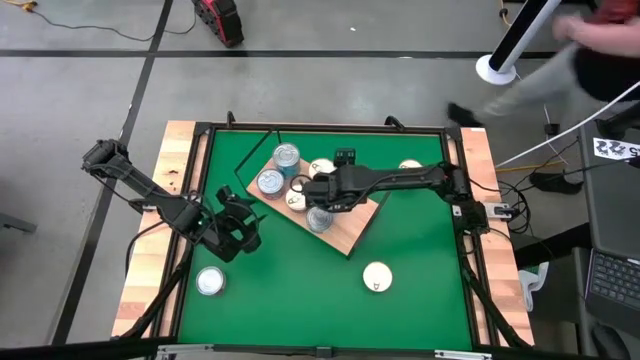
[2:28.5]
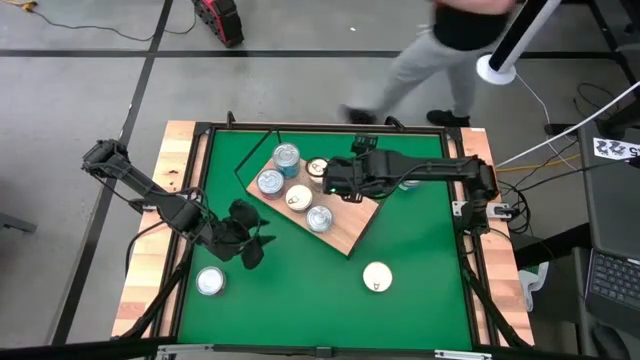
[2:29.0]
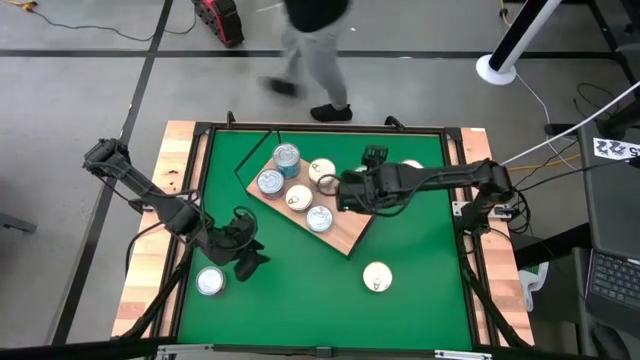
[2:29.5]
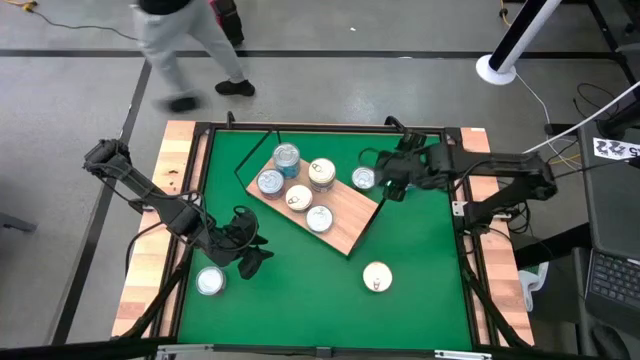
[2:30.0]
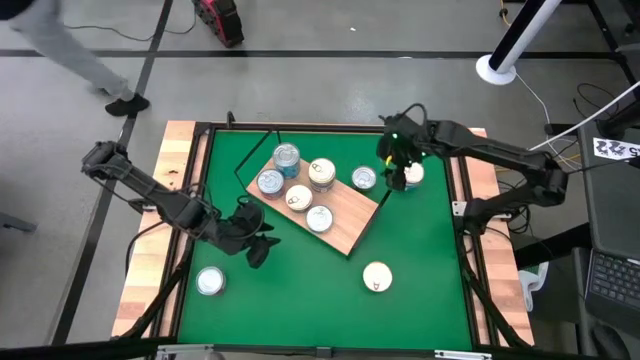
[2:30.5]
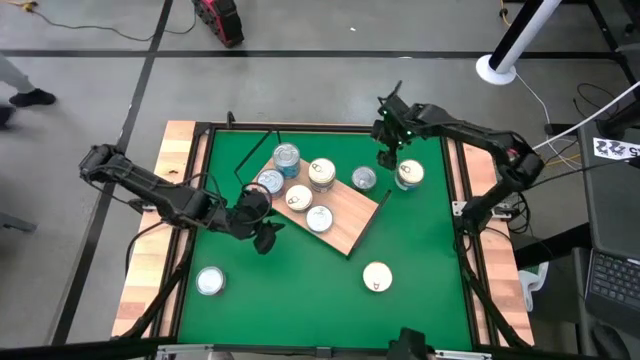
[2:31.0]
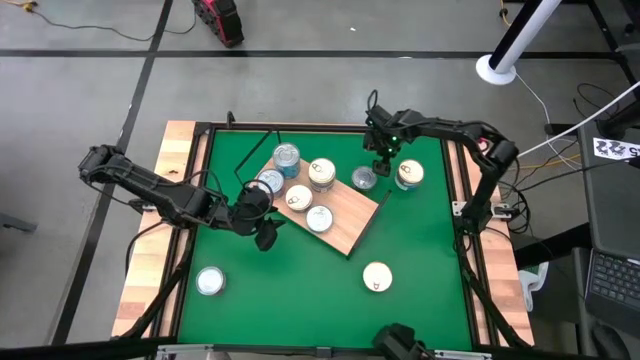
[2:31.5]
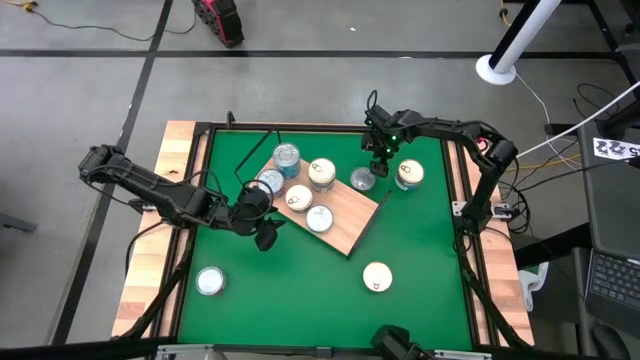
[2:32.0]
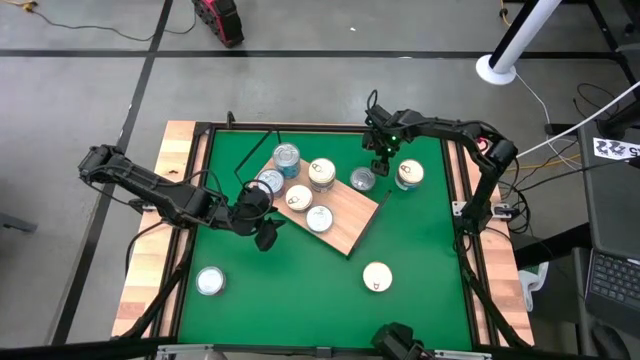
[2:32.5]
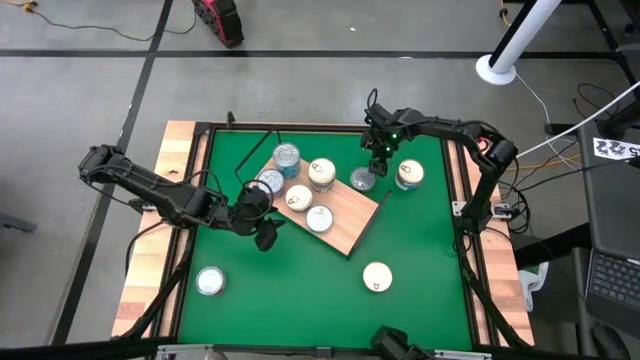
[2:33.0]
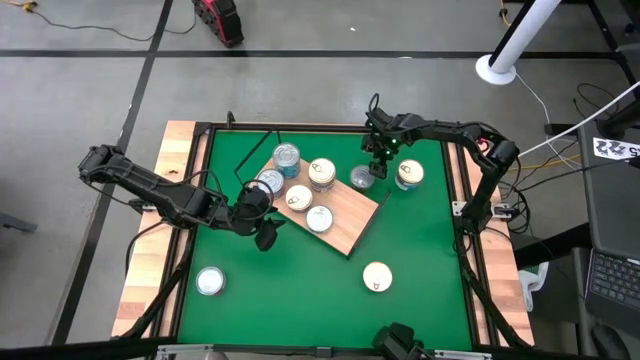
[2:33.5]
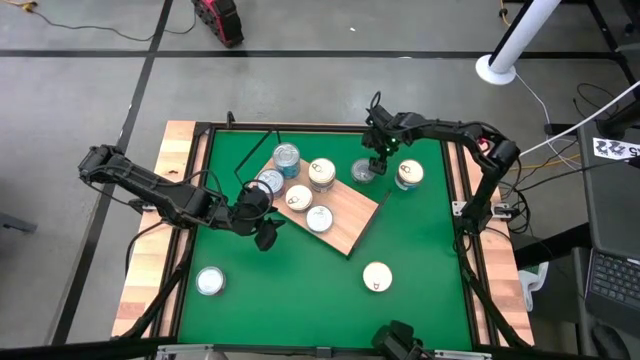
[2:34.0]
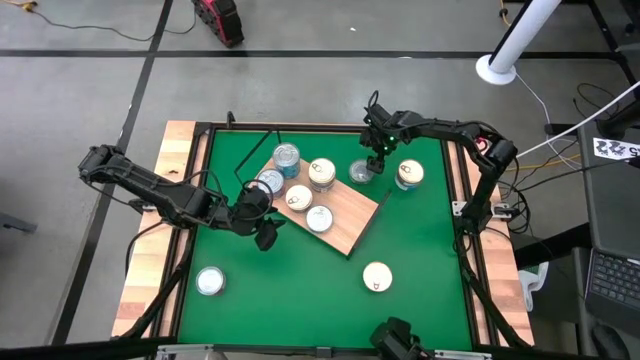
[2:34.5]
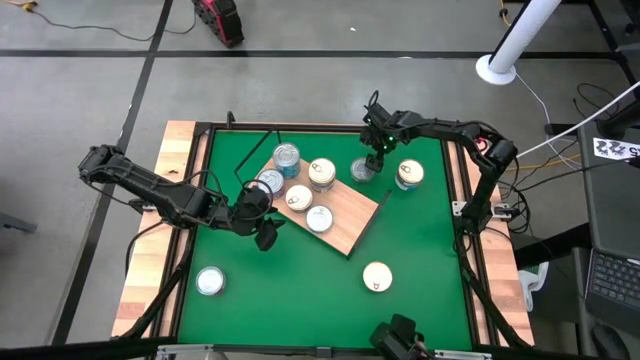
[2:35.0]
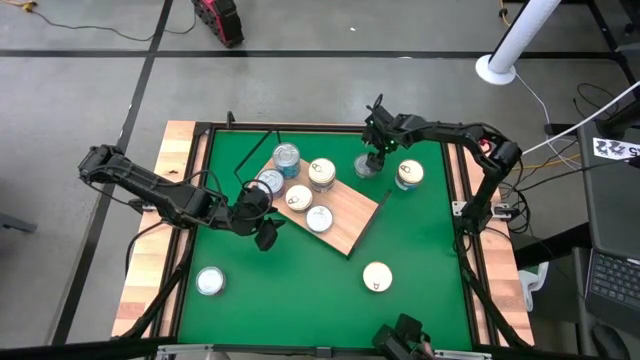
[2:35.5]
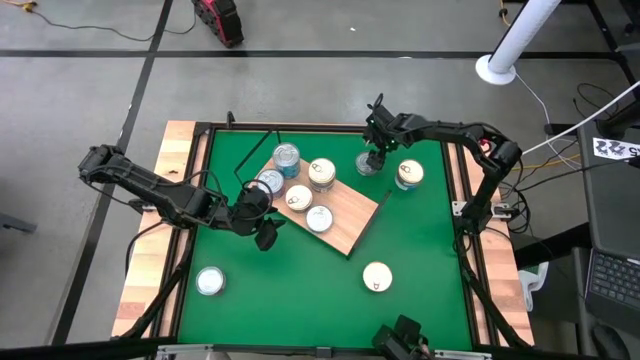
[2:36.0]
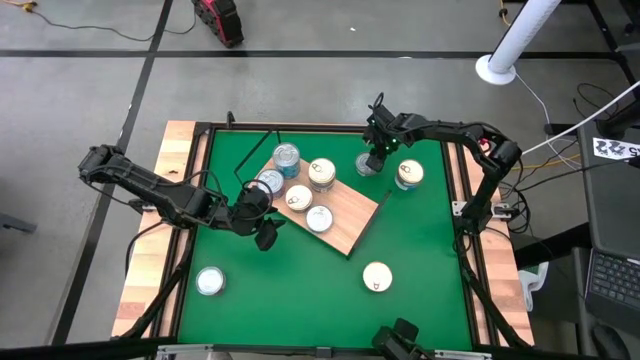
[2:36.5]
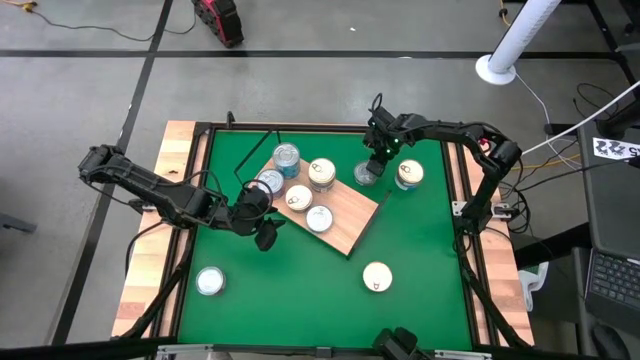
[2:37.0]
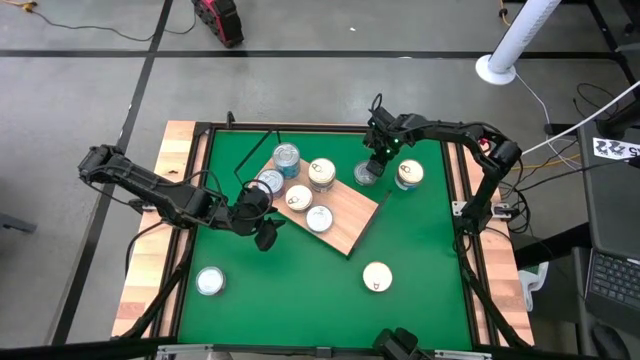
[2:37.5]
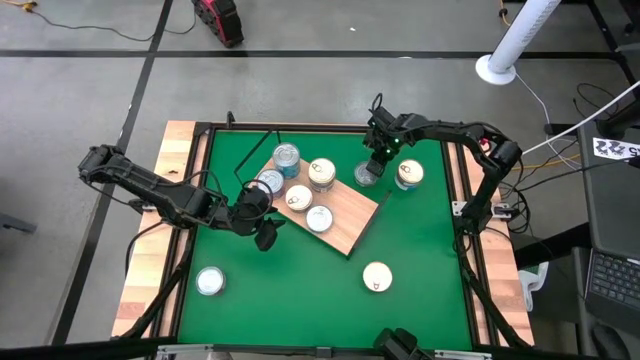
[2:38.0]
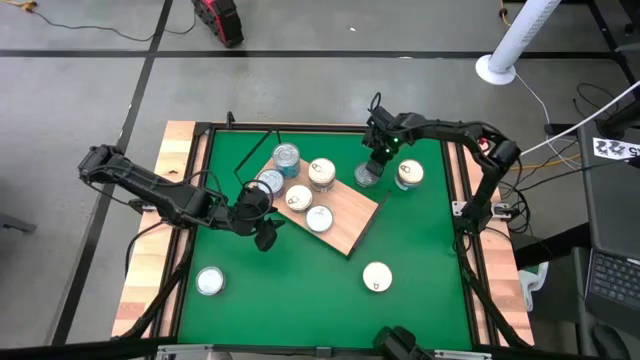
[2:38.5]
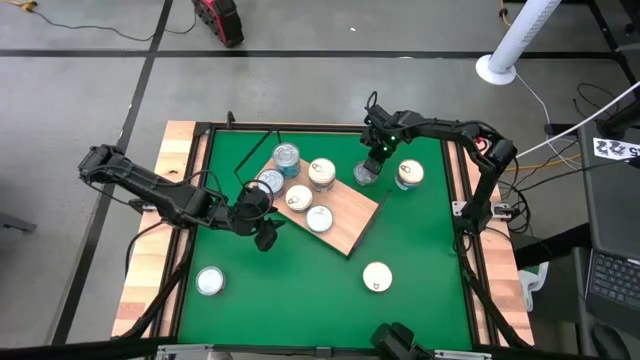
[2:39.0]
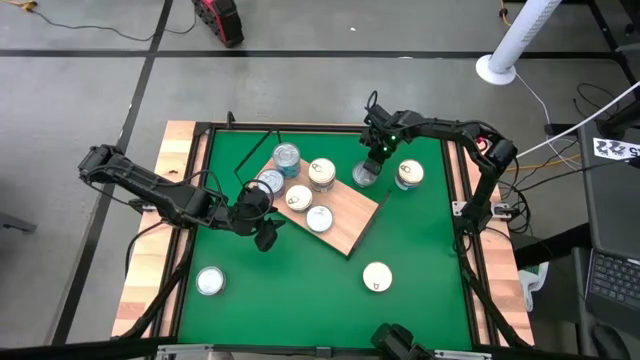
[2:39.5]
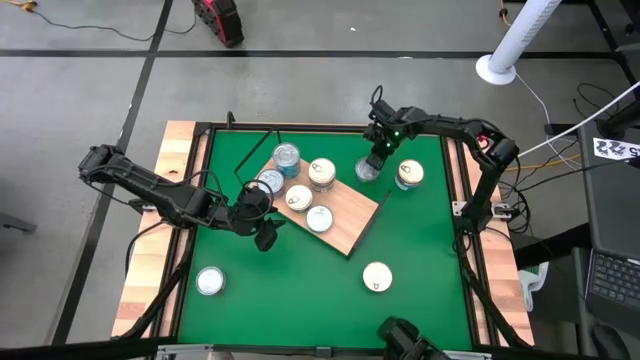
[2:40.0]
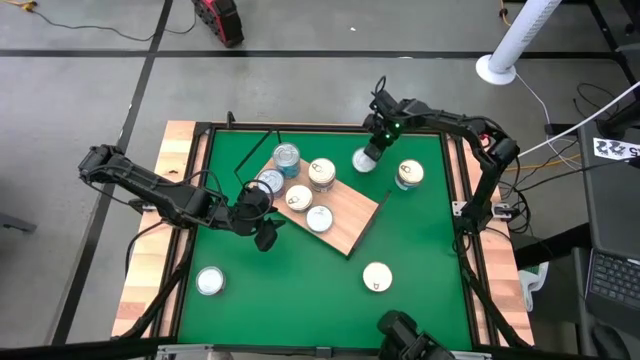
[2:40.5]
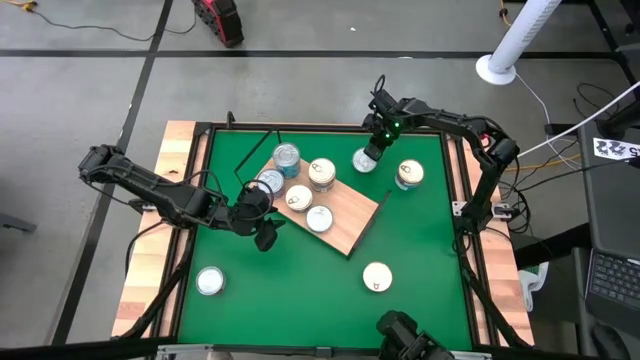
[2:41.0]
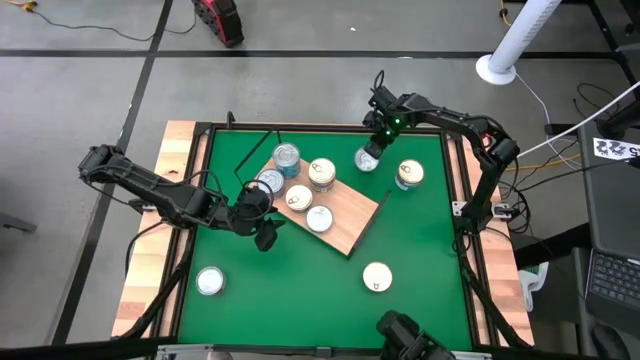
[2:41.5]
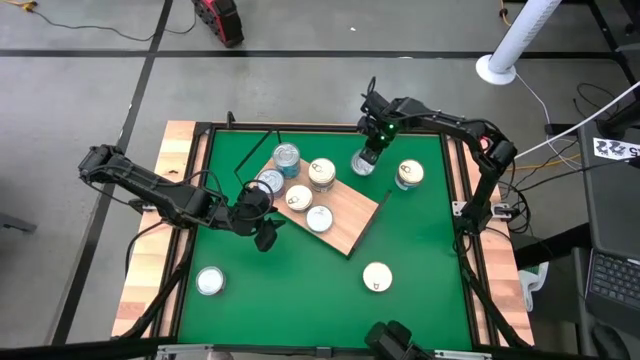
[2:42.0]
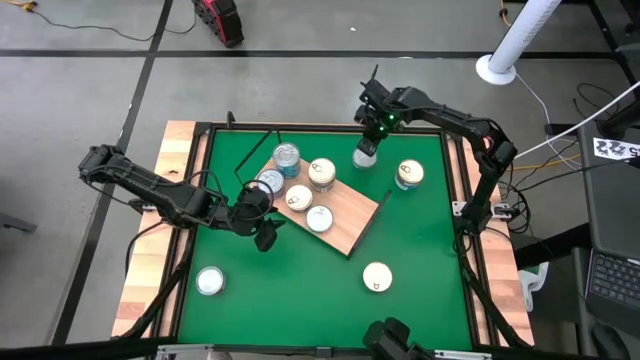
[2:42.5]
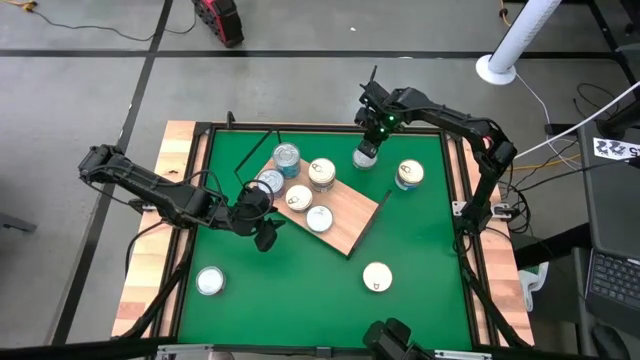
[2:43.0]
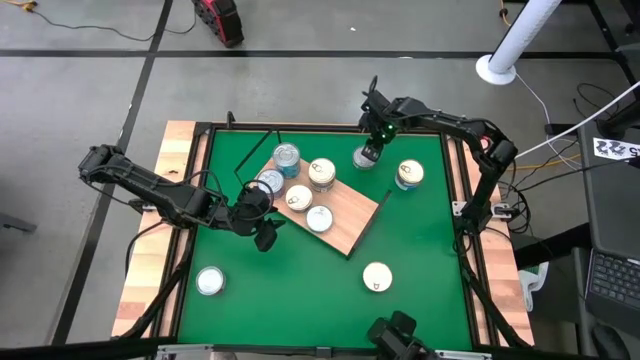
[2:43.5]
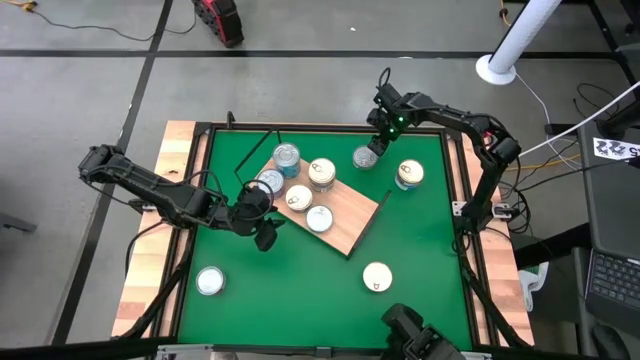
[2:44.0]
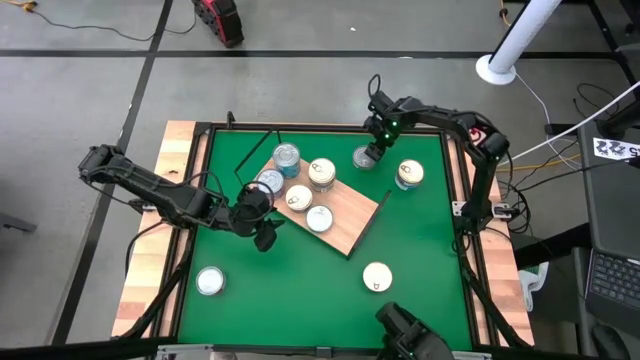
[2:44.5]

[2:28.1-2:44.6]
Task: Stack canned seafood by type on shelf
Stack the green can on top of the green can on the shelf

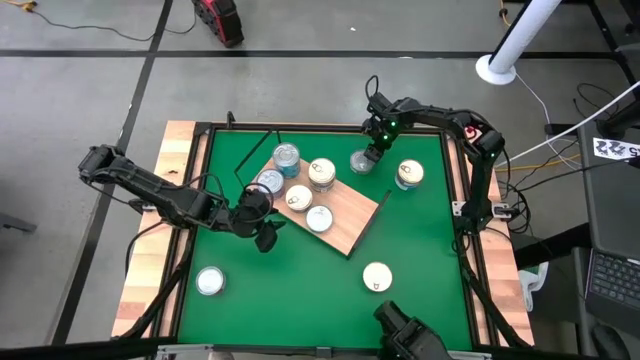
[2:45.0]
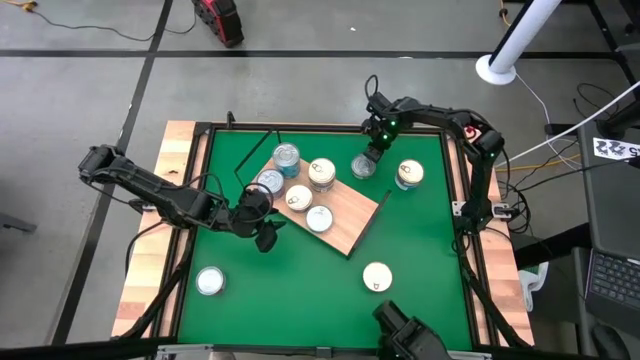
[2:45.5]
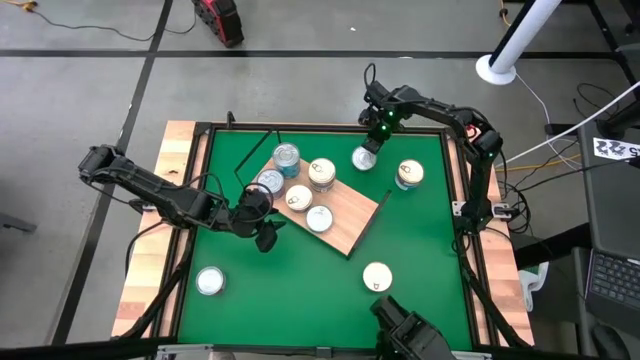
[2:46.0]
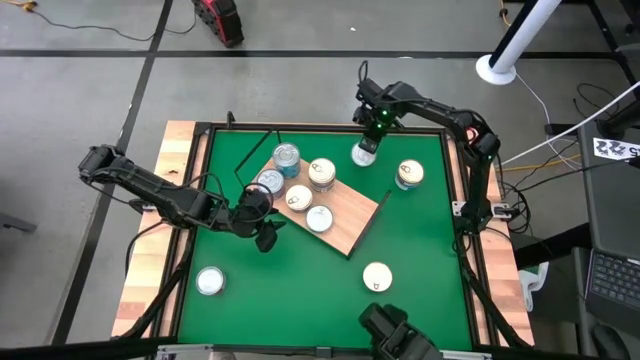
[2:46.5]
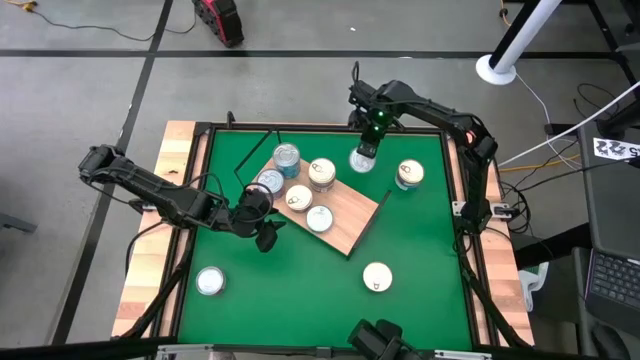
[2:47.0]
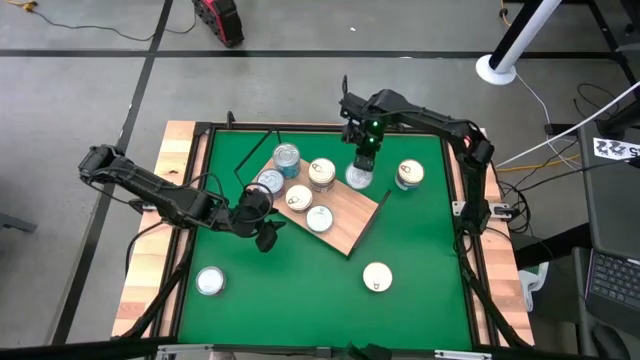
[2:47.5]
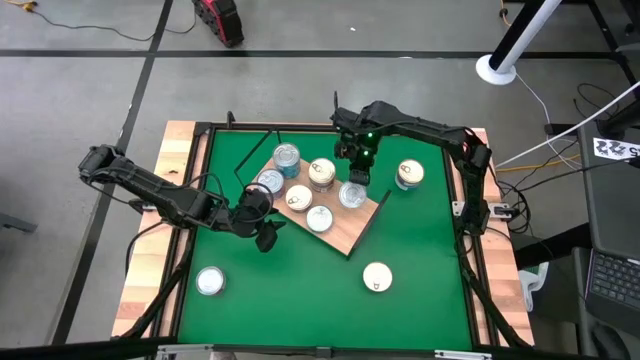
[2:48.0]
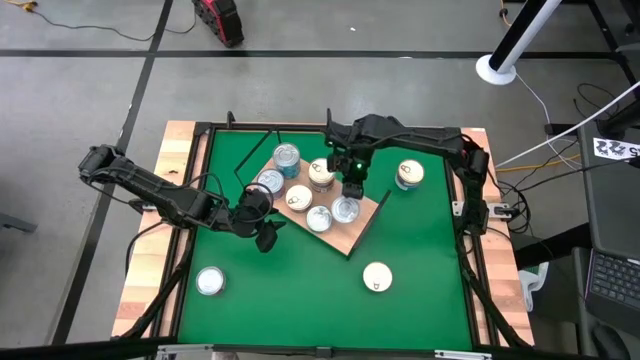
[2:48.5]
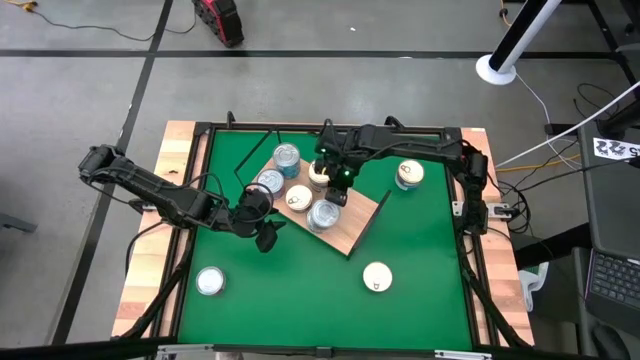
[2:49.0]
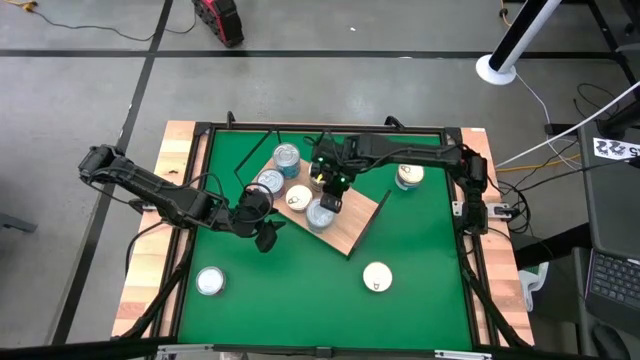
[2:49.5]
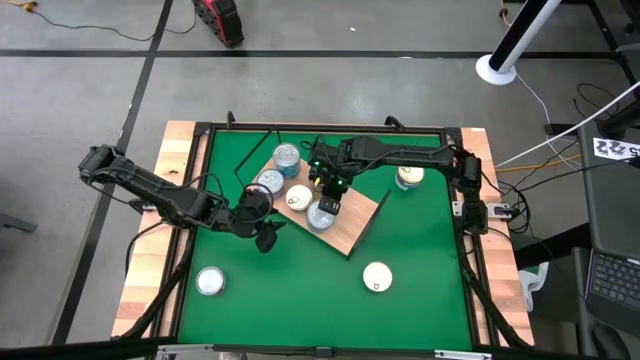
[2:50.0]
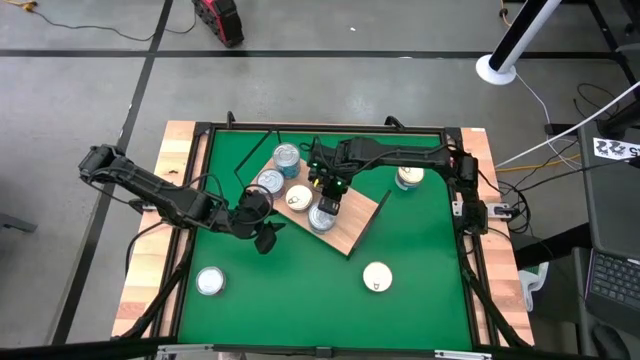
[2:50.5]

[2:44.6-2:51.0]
Stack the green can on top of the red can on the shelf
